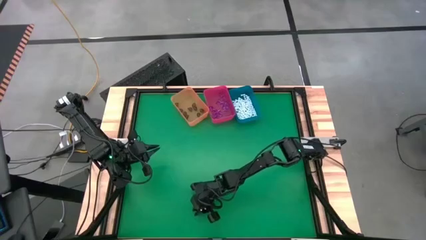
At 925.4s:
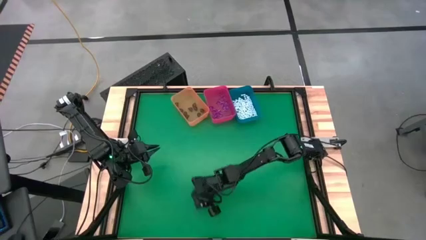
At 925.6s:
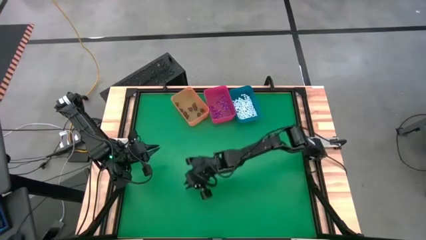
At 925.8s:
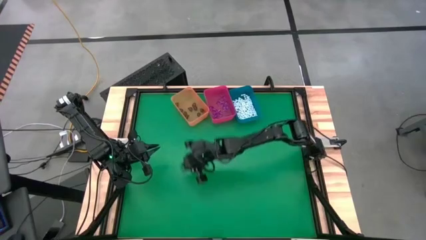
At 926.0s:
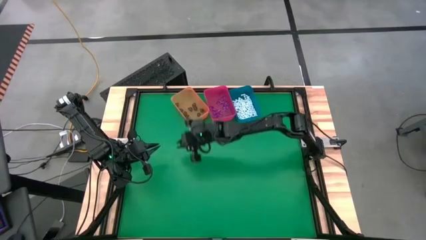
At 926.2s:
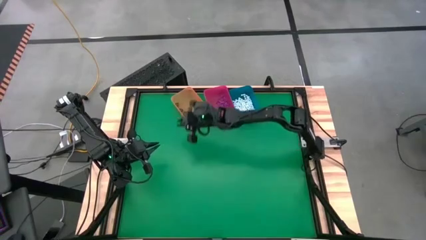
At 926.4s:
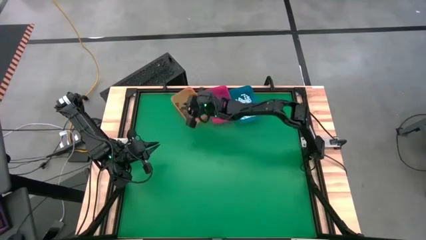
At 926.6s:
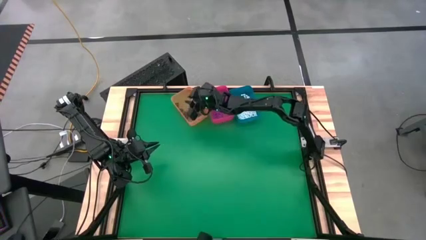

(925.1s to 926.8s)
Task: Sort Halloween decoration
Put the transparent black skull toy into the orange bin

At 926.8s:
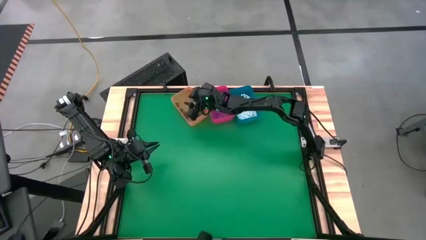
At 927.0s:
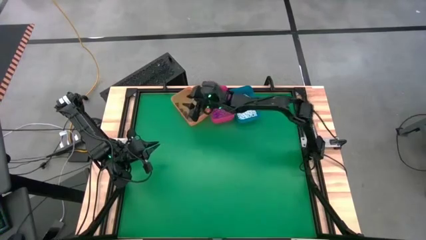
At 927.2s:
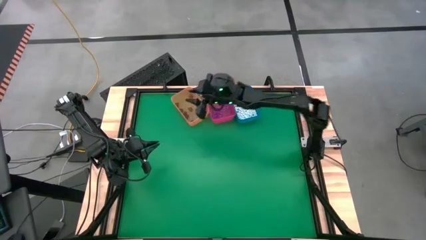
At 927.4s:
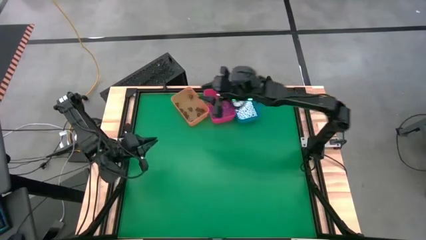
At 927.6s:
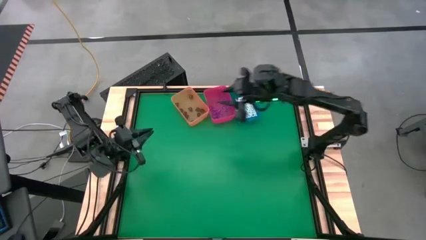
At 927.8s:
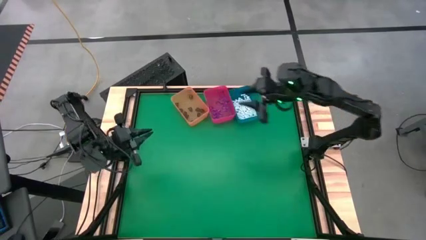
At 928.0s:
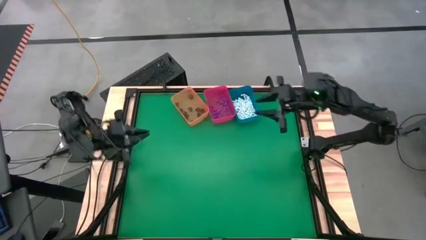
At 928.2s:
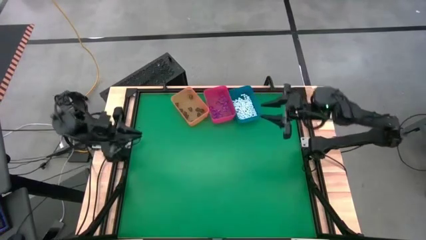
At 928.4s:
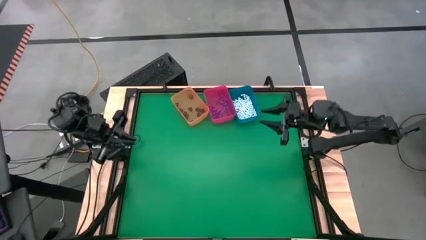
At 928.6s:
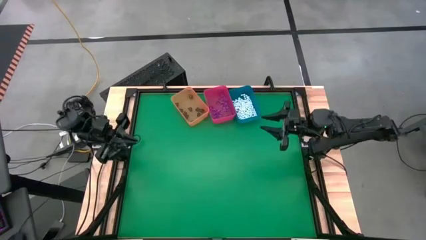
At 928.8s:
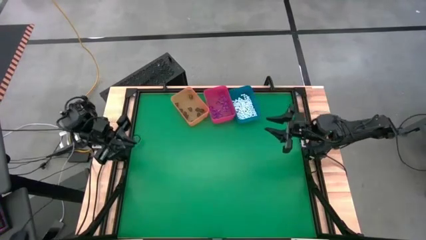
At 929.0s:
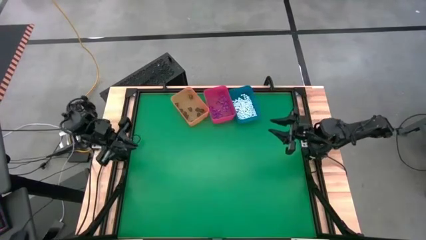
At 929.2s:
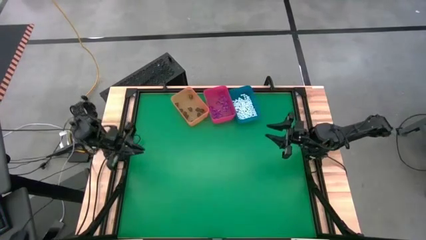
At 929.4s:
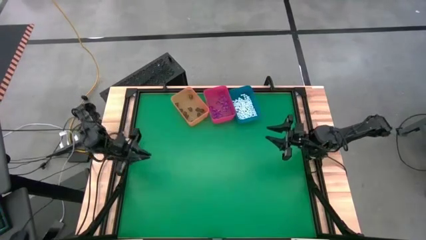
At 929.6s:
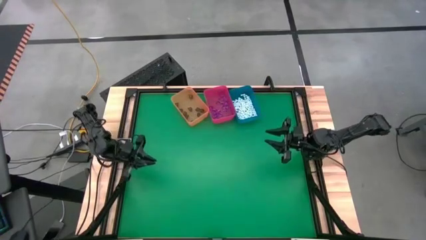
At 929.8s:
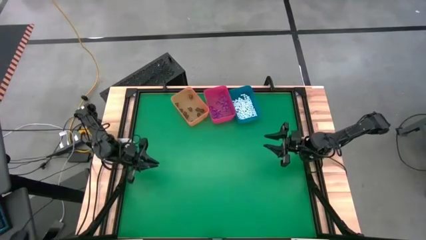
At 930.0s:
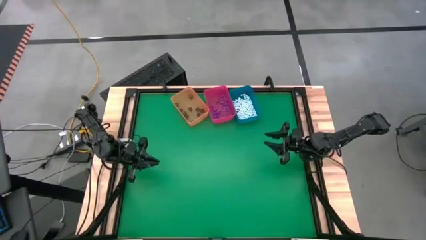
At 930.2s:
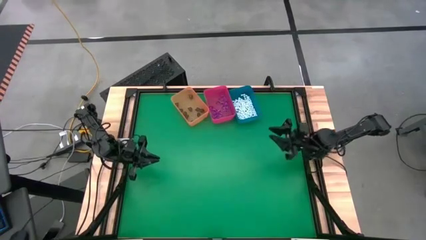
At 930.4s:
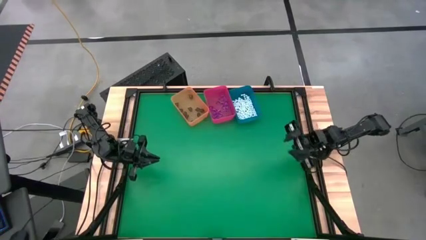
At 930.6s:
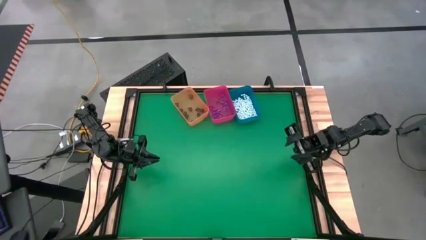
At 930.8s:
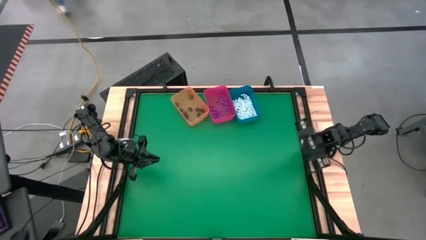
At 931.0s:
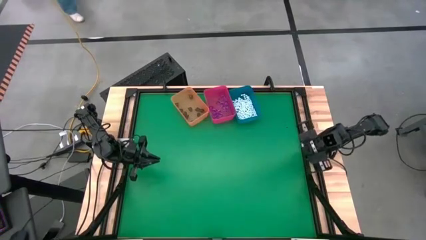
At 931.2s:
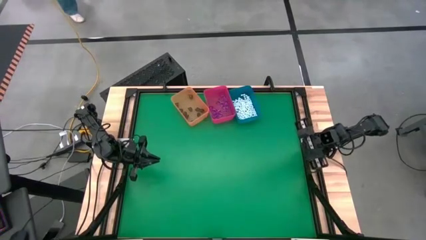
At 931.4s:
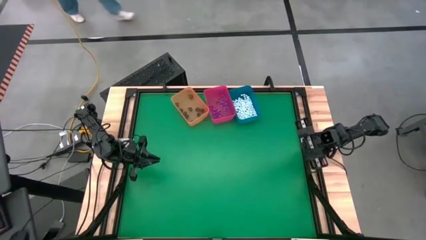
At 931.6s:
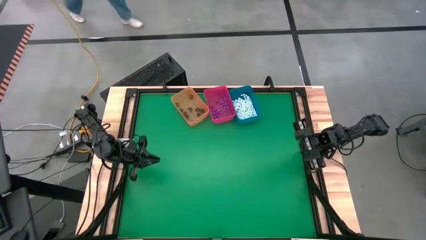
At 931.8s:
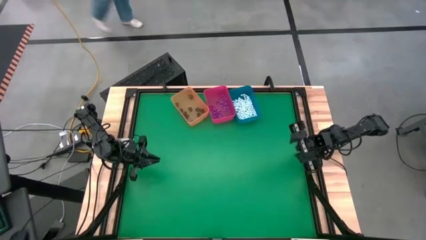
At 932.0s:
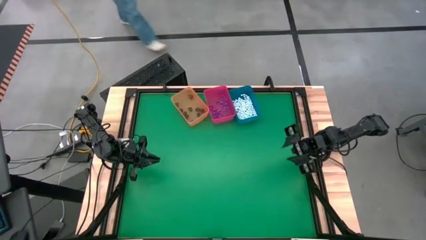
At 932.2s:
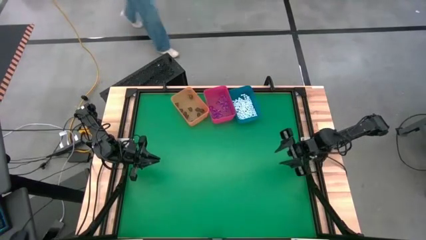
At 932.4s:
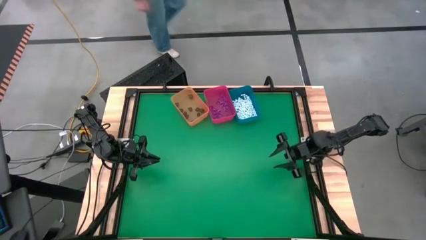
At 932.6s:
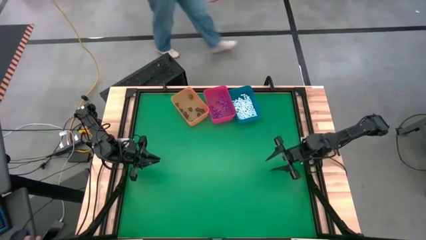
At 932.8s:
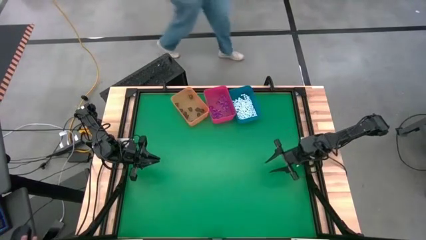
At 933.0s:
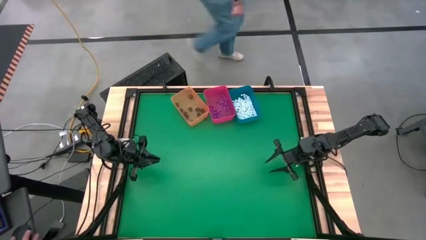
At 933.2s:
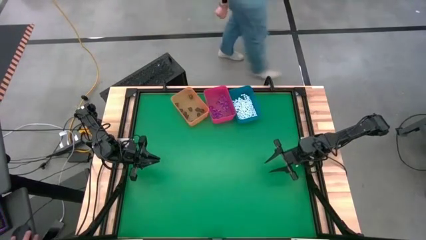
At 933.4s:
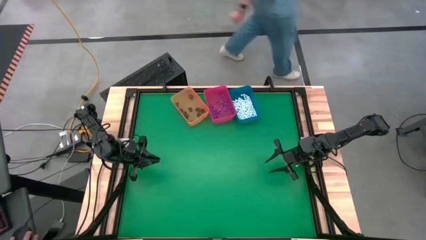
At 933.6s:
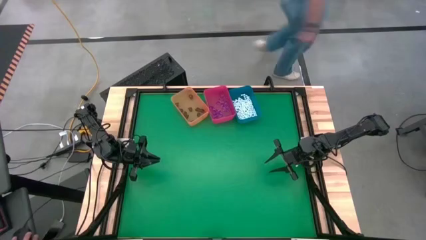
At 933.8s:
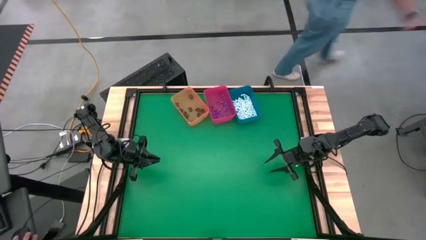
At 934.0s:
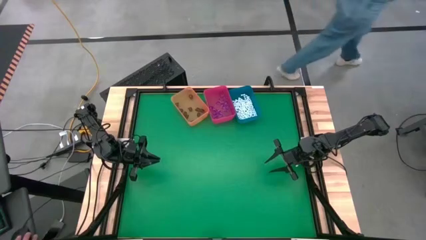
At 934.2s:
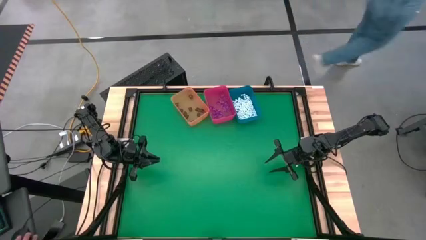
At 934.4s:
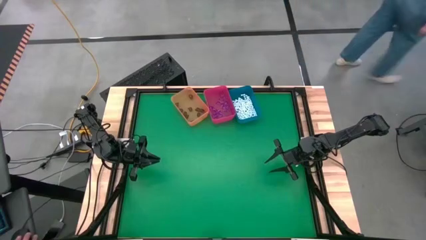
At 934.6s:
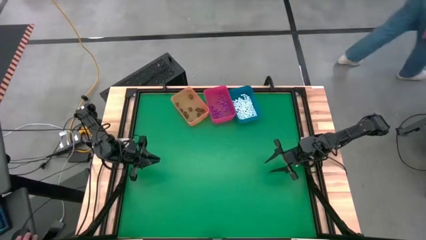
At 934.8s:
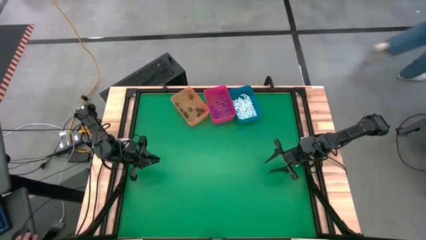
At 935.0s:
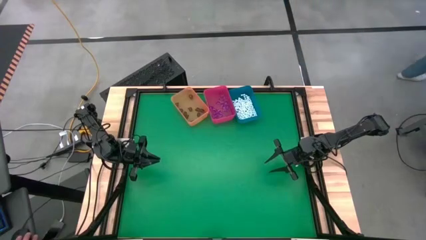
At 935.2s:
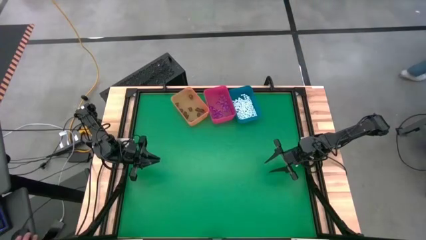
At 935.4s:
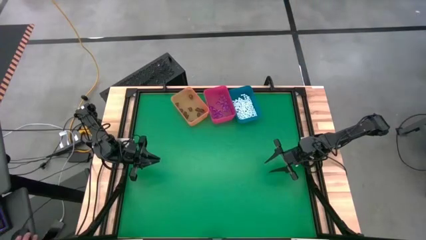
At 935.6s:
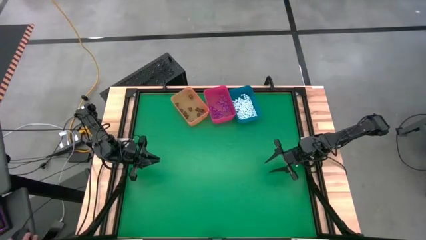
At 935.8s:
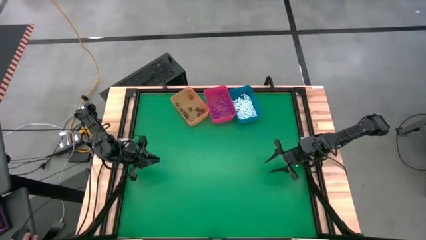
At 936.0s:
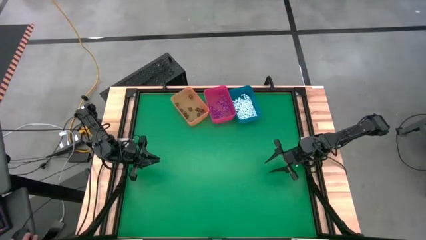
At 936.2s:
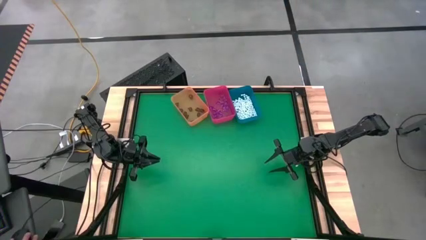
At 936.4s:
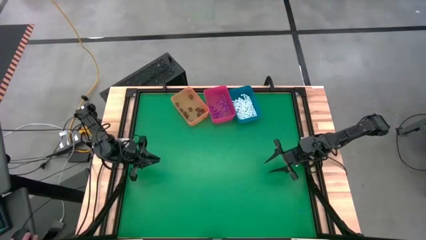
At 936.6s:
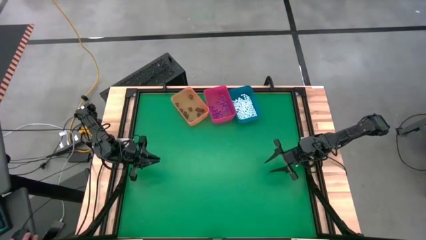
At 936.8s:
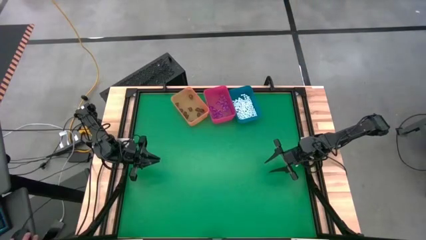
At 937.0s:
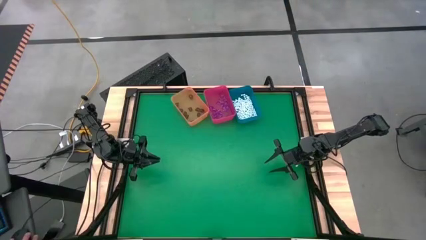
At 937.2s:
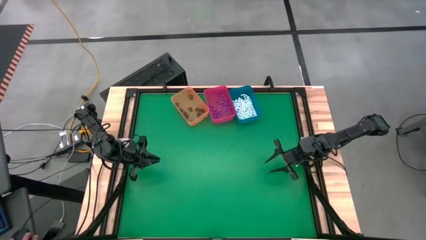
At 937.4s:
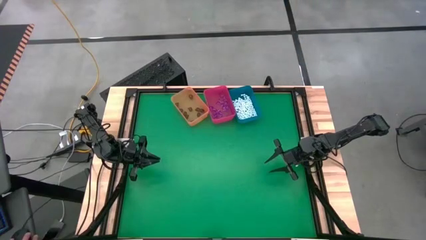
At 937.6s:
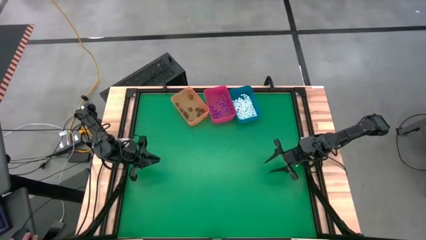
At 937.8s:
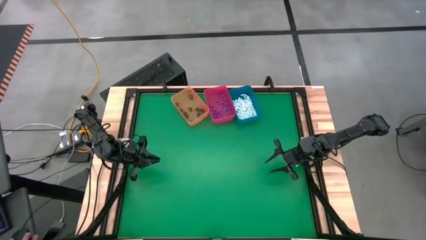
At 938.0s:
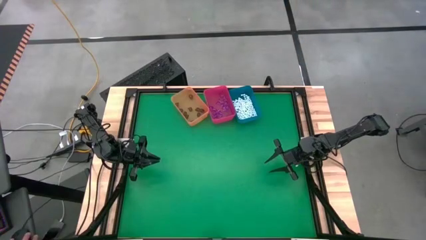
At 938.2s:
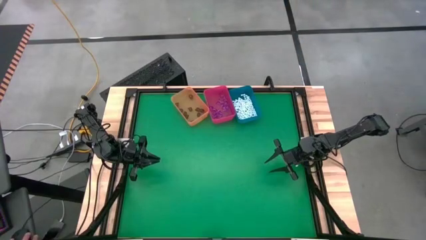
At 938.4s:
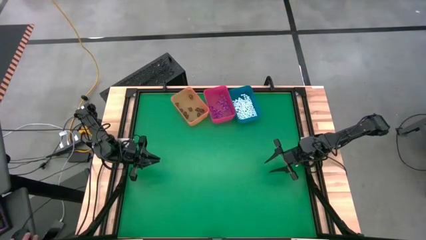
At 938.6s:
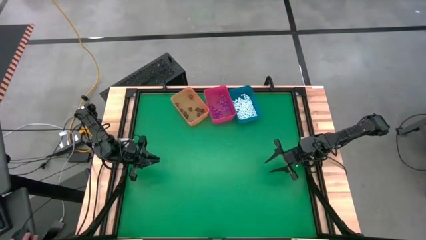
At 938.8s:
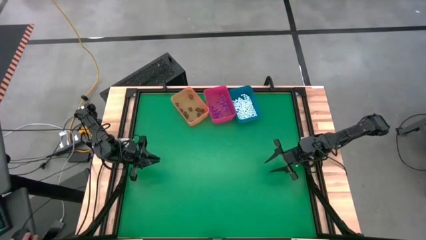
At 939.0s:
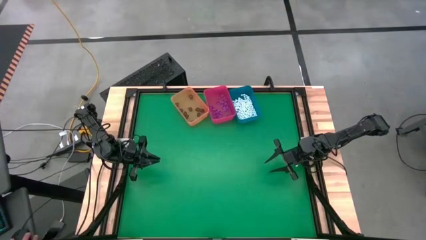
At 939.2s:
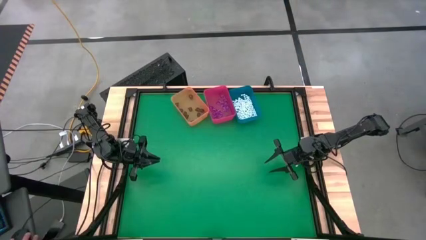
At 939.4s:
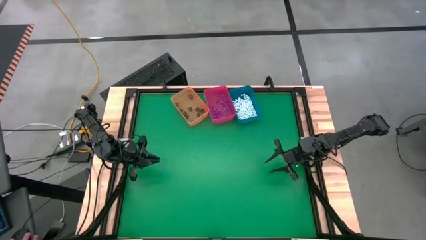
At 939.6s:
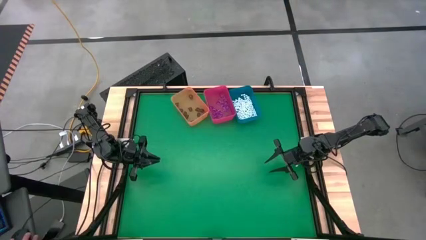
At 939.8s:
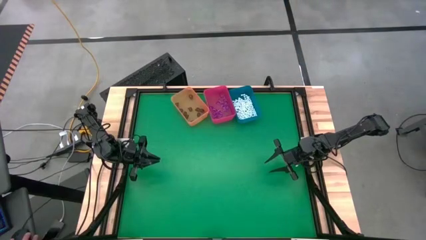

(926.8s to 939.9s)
Return to Home Position

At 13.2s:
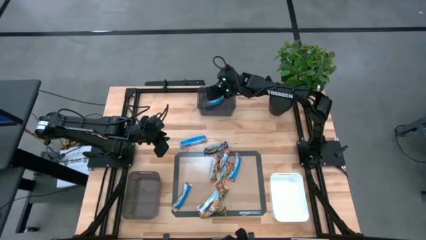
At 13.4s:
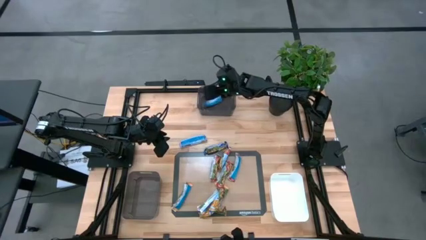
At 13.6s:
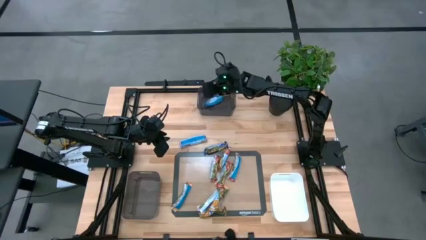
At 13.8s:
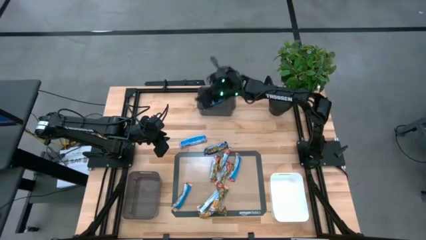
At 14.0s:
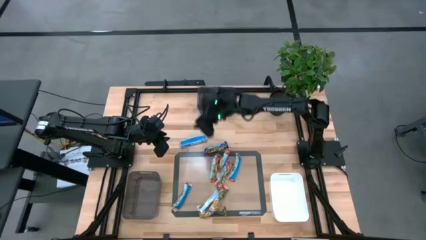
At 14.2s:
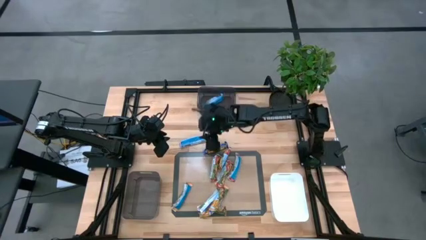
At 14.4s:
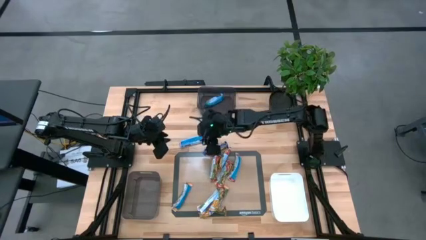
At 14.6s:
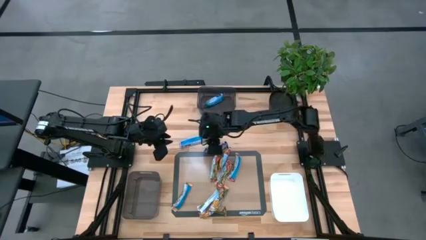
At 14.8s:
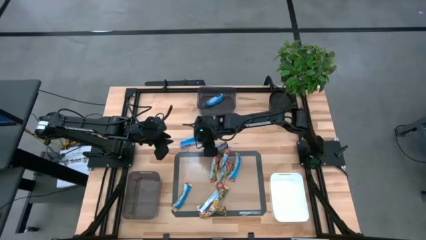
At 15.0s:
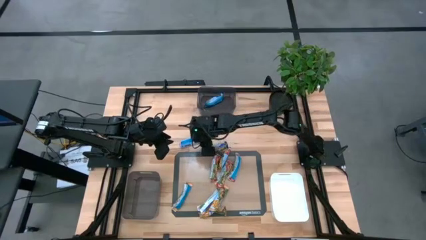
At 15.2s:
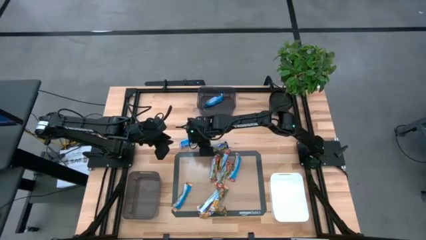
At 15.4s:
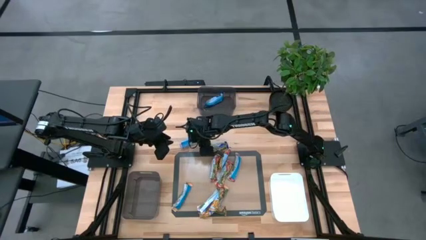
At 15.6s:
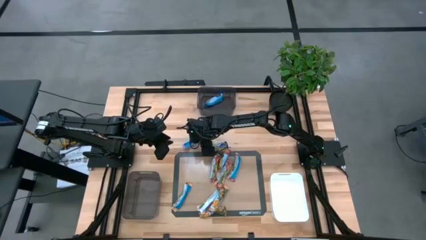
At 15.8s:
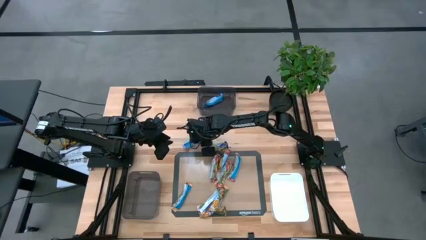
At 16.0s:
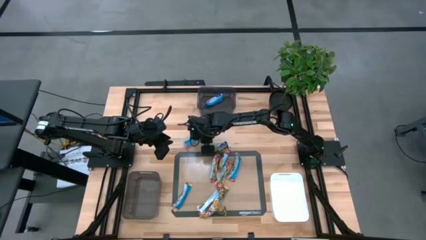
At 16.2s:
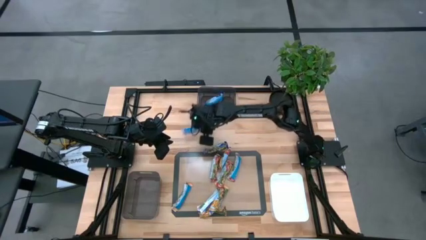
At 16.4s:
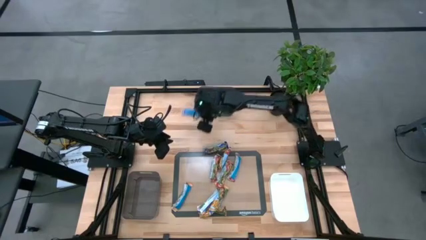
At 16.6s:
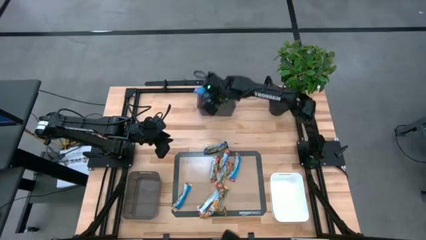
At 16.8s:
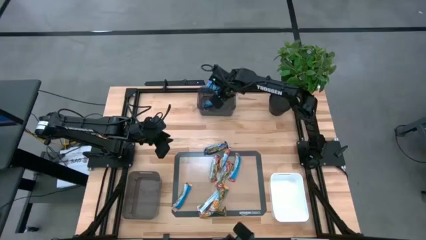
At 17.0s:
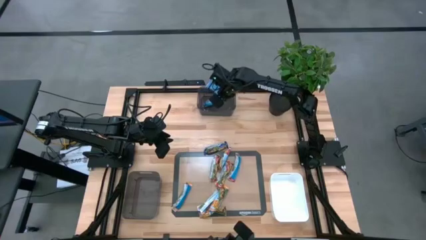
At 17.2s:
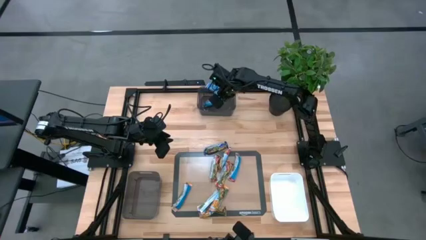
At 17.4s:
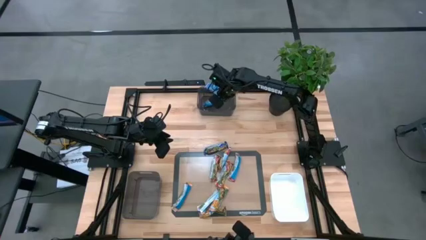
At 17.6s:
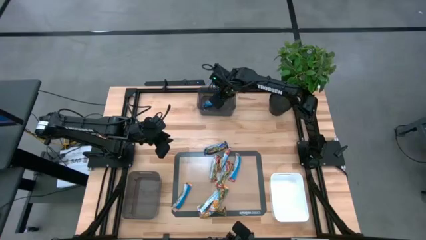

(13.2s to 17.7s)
Task: Pick and place Granola Bars by type
Put the blue granola bar into the top black bin
